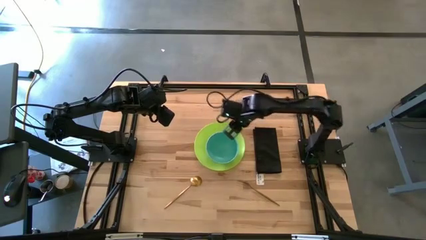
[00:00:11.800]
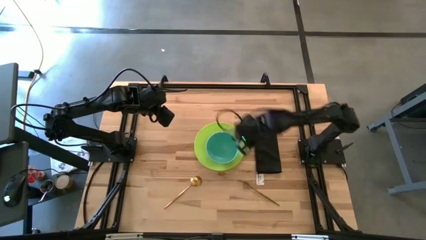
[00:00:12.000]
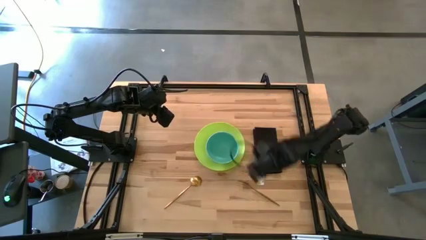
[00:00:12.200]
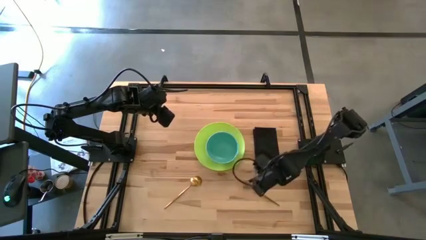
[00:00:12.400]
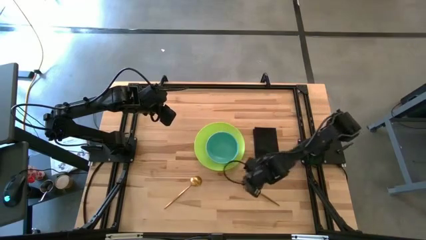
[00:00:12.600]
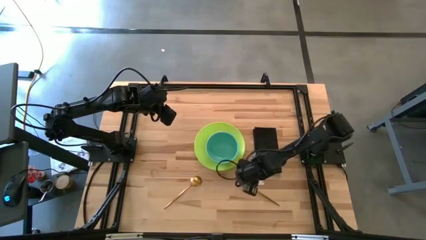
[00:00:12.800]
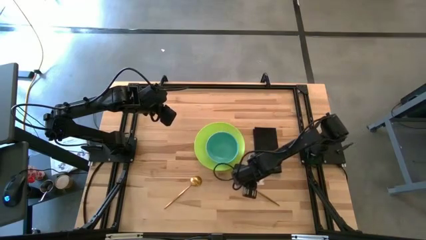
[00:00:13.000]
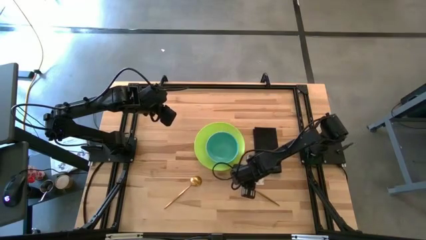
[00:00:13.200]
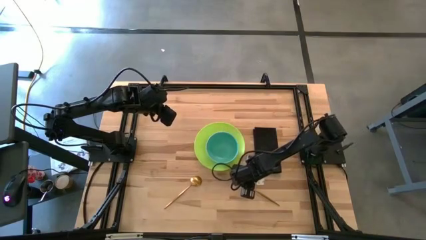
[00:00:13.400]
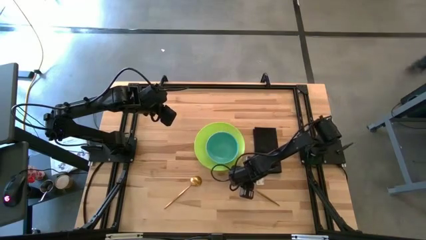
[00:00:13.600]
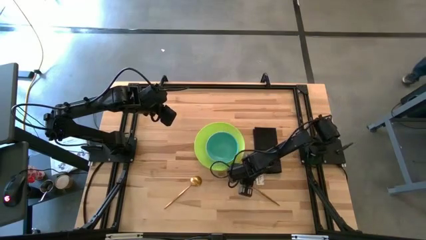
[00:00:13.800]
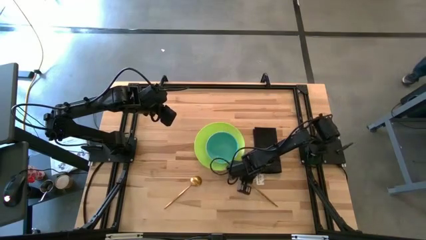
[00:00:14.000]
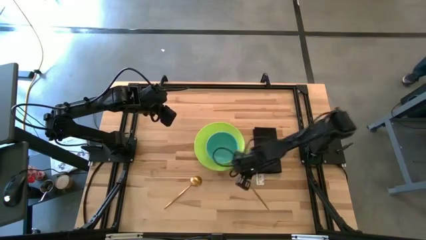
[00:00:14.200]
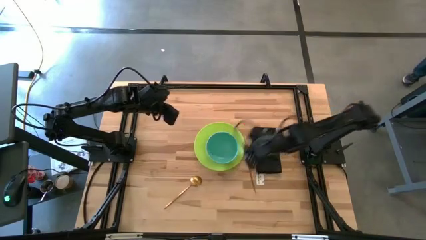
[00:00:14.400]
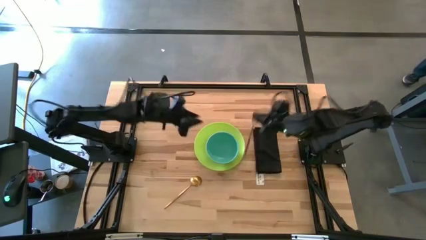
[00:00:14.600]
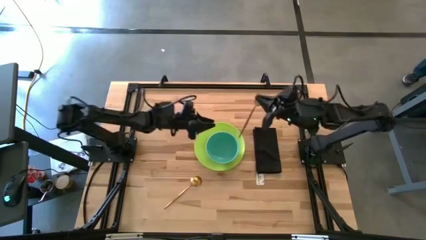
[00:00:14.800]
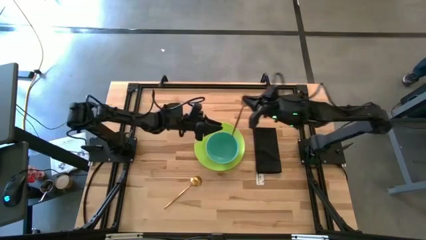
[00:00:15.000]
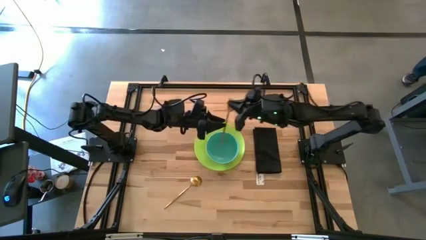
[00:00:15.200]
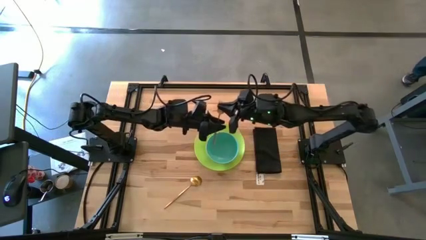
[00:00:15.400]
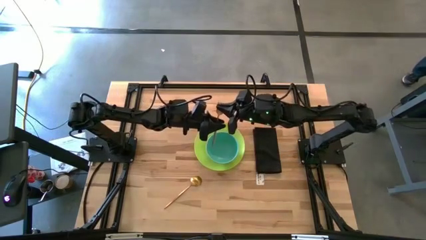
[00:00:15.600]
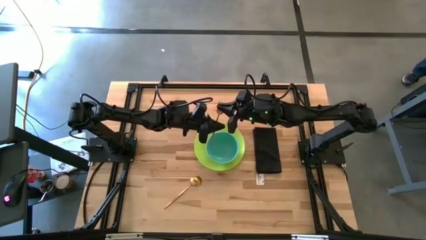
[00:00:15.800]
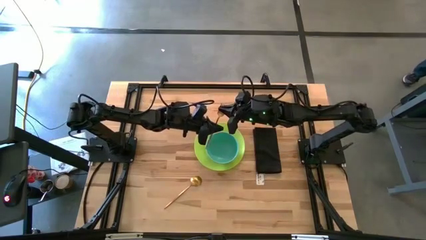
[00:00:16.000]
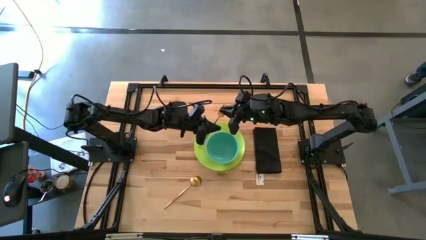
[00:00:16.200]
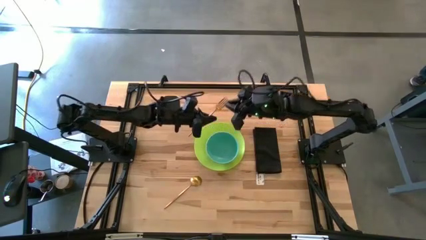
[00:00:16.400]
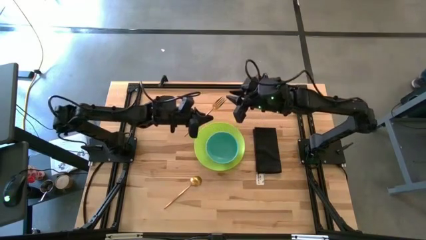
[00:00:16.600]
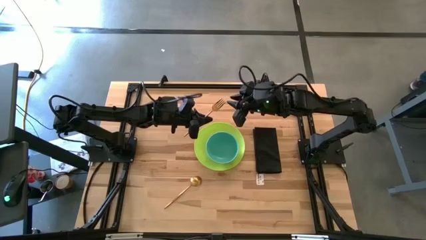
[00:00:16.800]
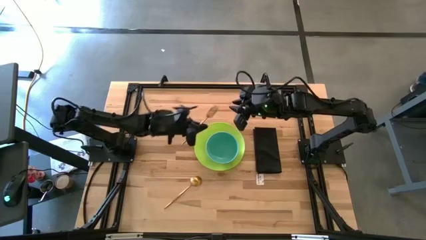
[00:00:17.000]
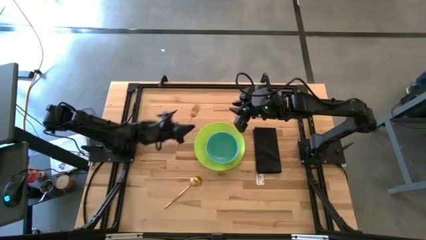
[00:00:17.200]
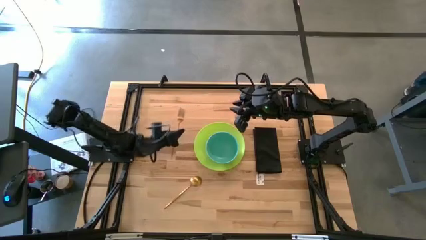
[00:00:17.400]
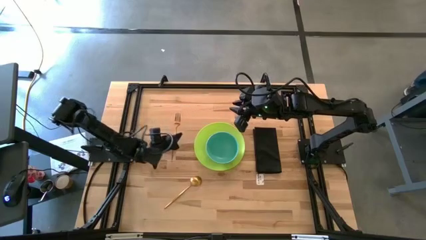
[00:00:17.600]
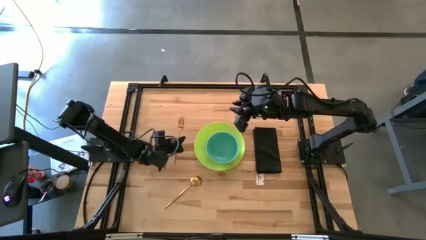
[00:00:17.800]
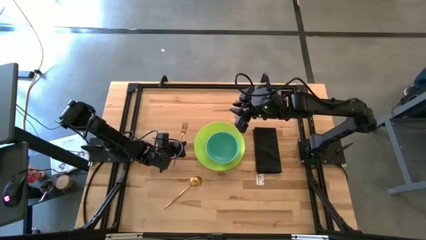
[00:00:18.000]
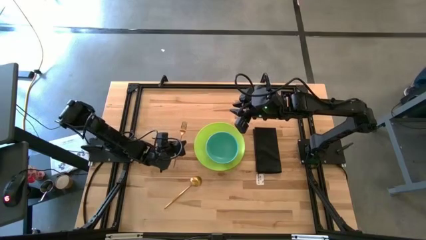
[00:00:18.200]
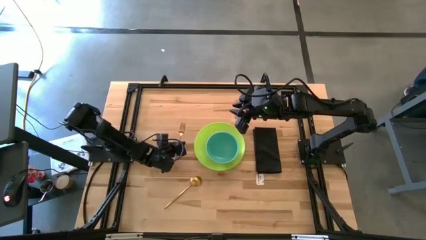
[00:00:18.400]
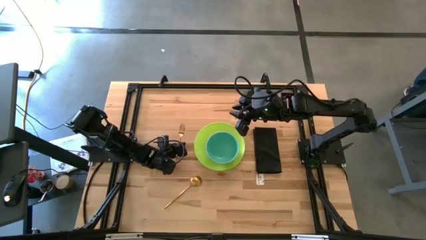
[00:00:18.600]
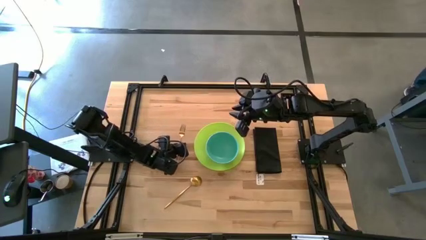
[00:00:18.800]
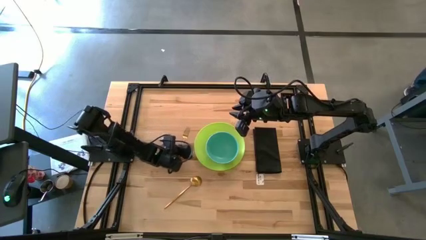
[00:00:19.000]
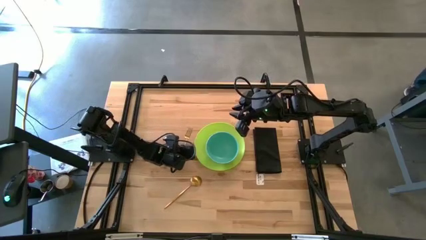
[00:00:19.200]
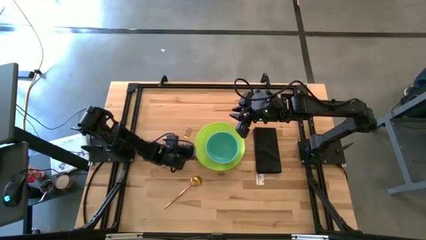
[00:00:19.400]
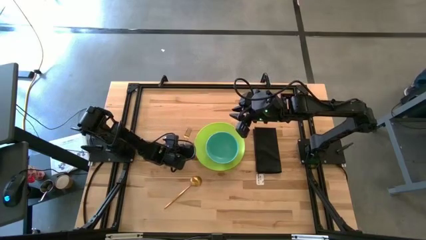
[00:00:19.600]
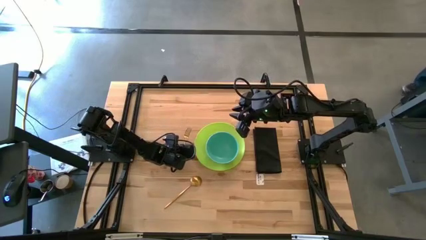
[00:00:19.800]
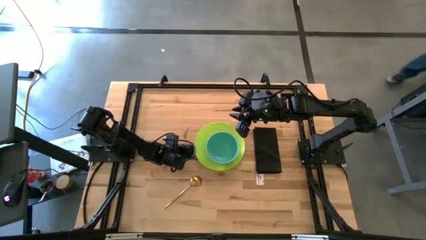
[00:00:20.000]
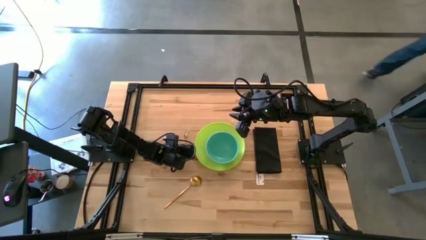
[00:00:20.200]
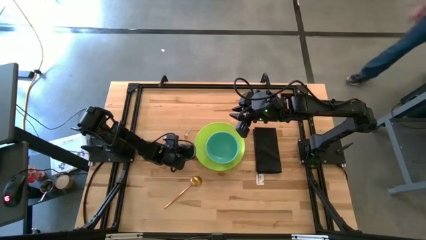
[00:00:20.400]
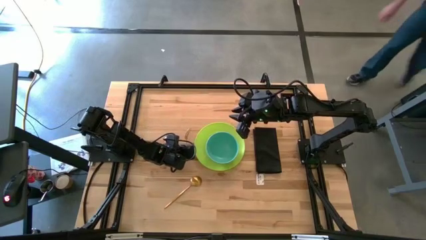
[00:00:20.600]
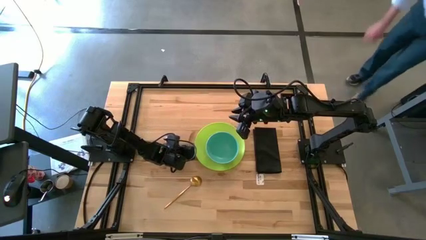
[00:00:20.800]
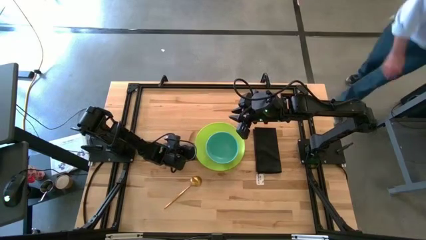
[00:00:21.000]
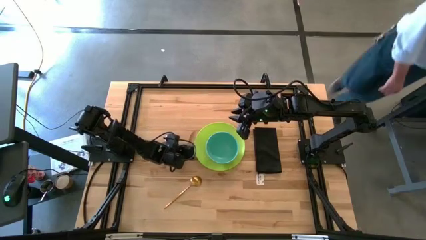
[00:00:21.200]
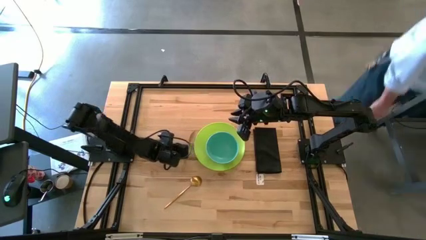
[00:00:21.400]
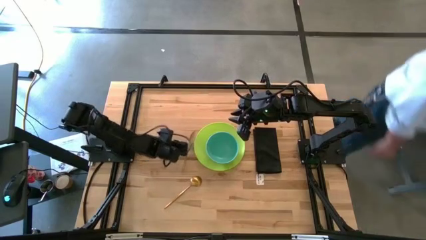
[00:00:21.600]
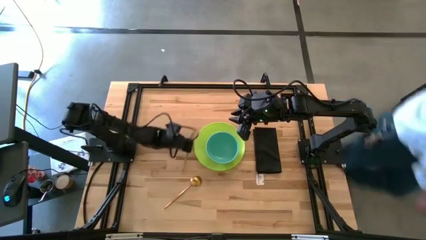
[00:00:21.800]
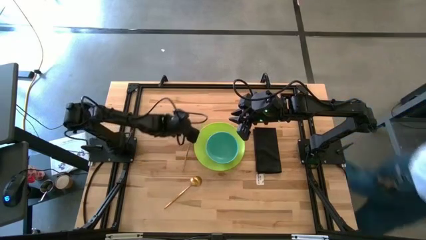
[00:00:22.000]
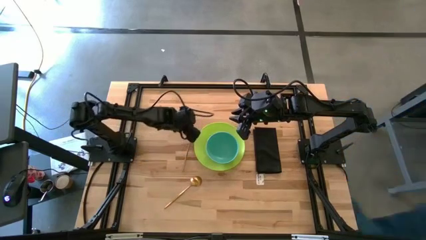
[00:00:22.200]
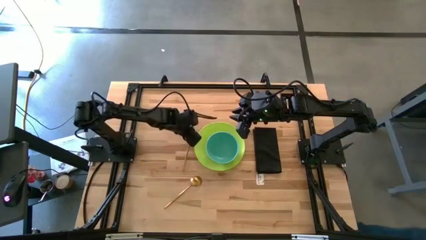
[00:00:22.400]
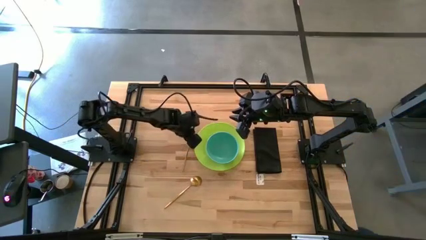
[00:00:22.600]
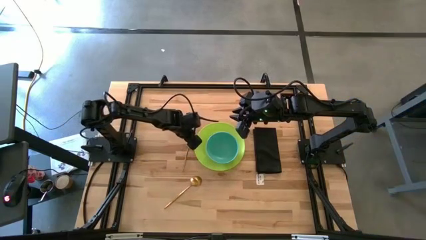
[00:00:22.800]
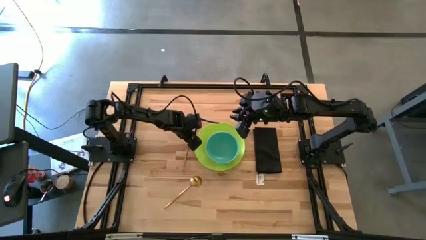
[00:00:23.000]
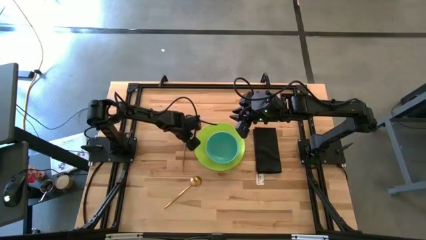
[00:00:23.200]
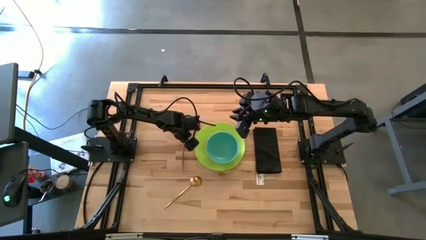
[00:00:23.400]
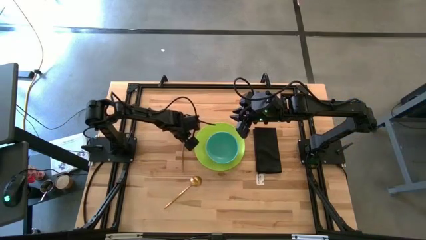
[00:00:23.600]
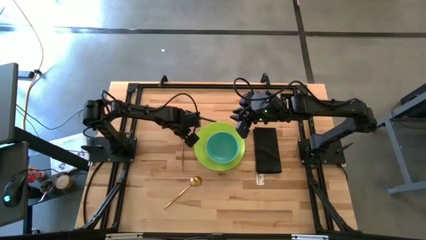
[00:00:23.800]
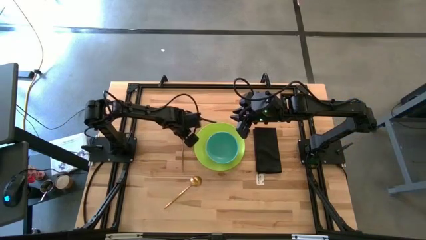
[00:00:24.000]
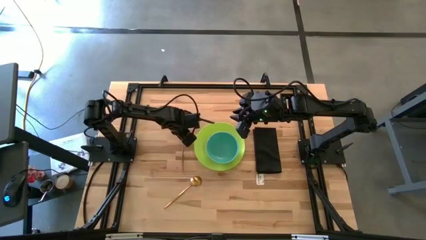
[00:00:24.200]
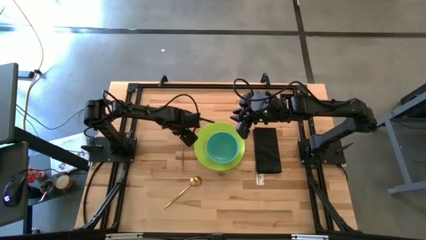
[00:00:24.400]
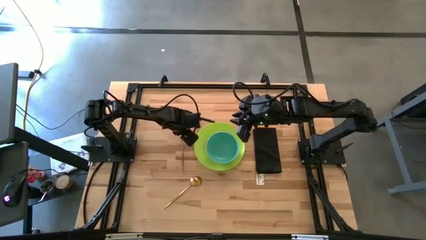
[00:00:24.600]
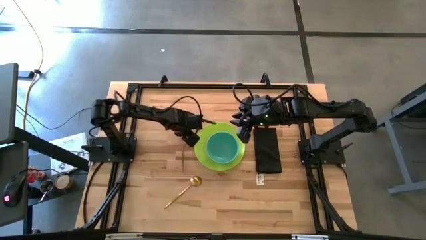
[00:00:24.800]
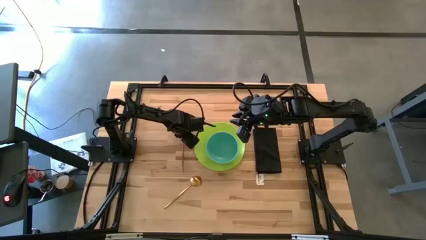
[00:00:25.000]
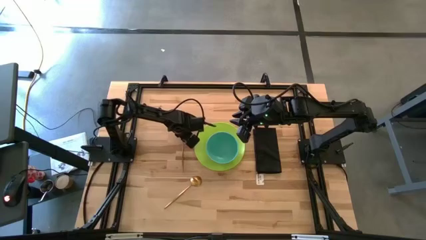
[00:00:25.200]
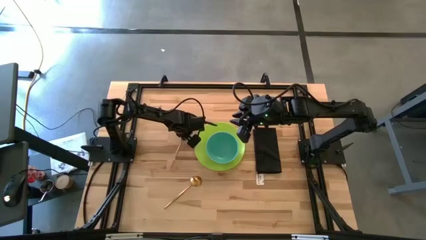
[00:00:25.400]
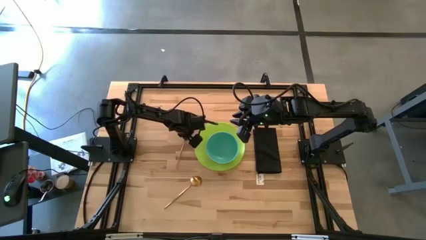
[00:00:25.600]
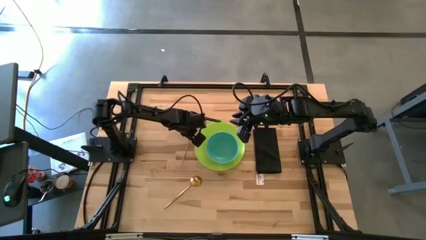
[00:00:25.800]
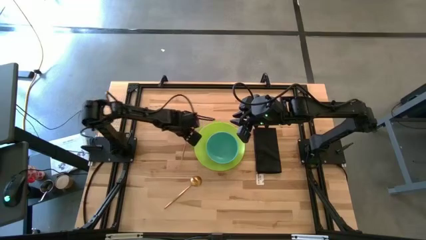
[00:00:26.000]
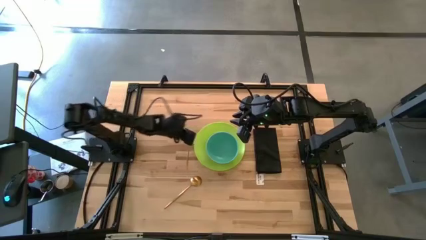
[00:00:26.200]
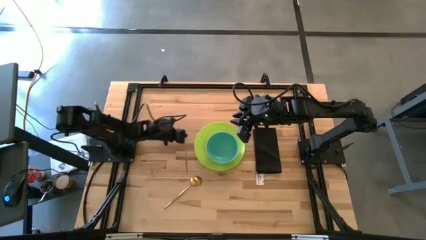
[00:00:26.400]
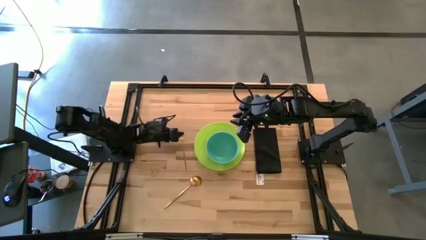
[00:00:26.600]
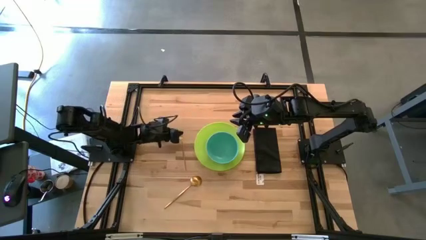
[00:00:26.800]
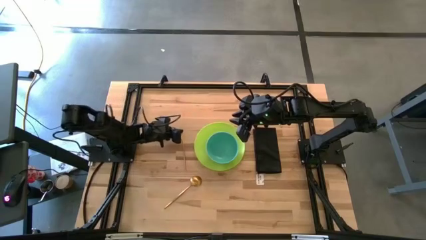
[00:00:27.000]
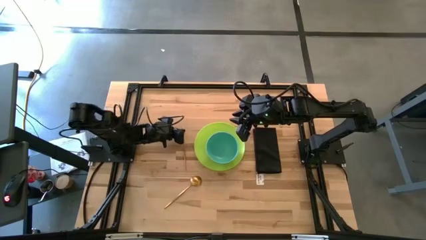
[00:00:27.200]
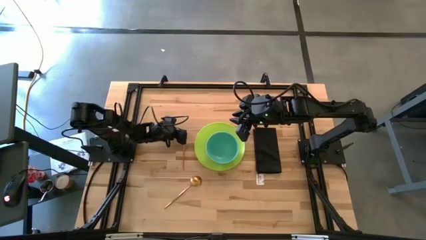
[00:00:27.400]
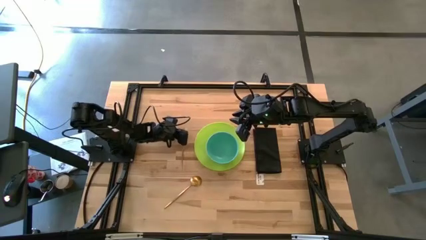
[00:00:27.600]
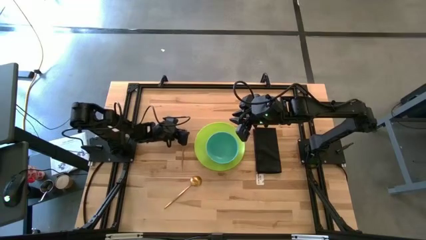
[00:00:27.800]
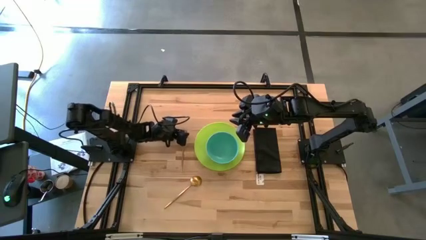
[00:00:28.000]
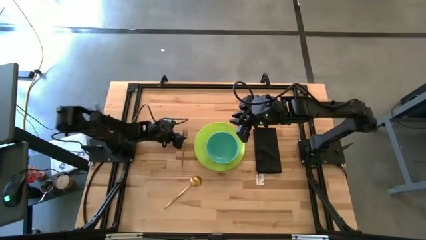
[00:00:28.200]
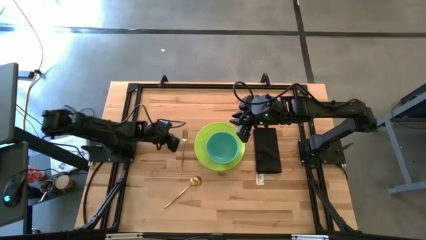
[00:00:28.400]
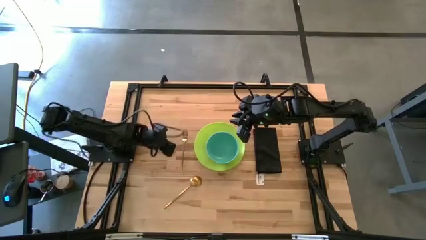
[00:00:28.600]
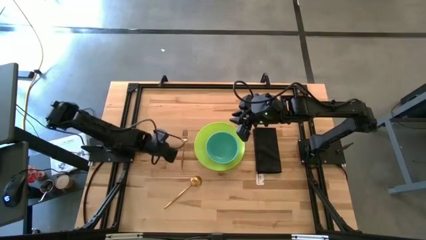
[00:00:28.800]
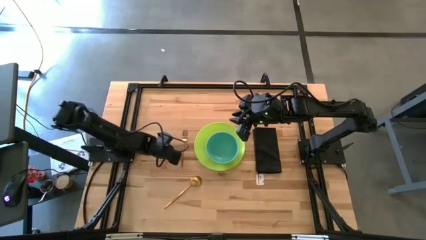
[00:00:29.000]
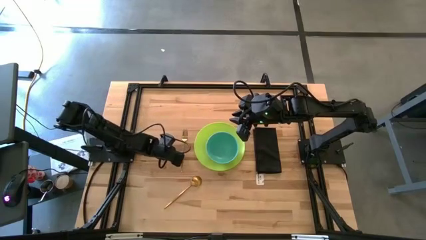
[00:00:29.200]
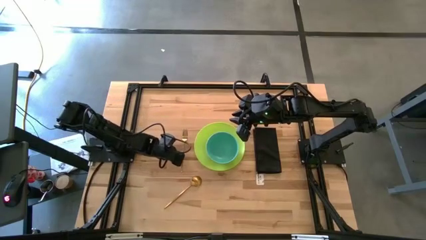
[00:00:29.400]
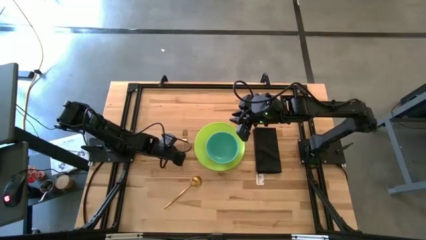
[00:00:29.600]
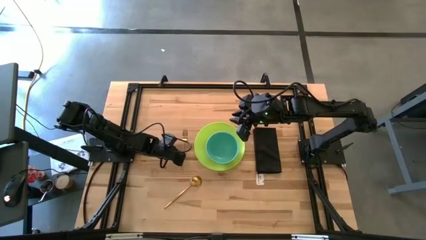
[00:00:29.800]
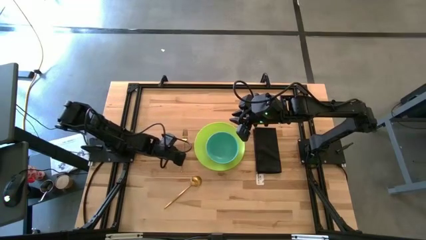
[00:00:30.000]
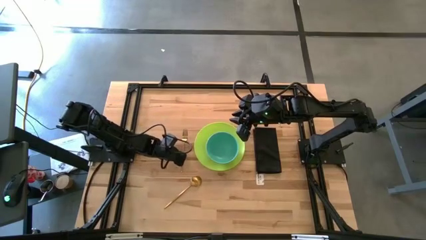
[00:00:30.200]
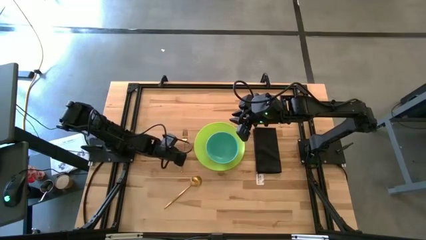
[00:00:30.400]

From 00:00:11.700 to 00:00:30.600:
Task: Set table place
Put the gold fork beside the plate
